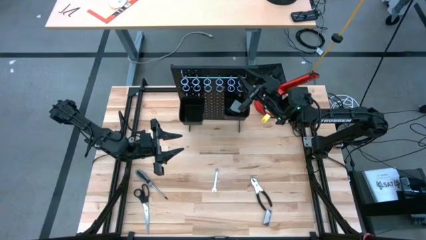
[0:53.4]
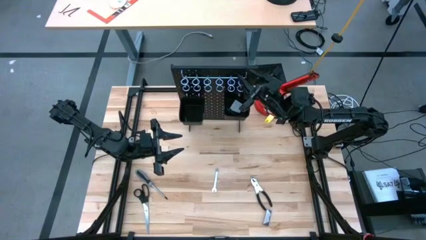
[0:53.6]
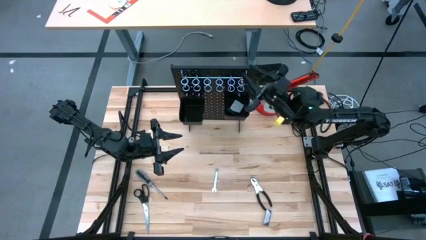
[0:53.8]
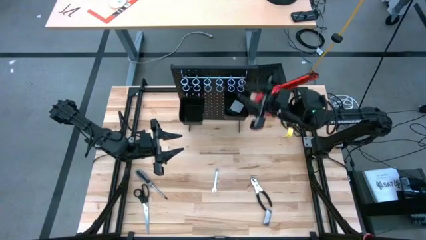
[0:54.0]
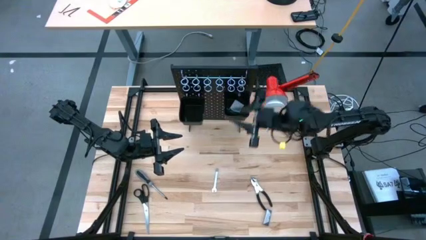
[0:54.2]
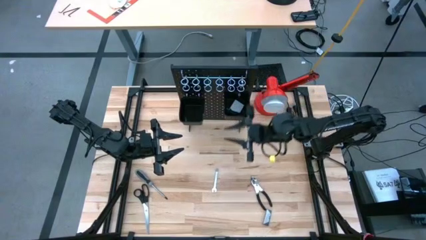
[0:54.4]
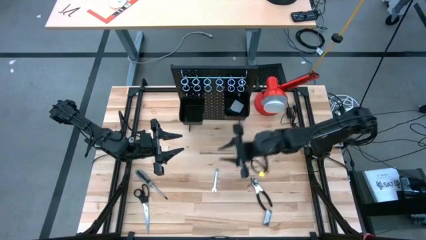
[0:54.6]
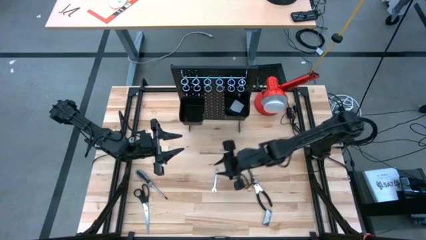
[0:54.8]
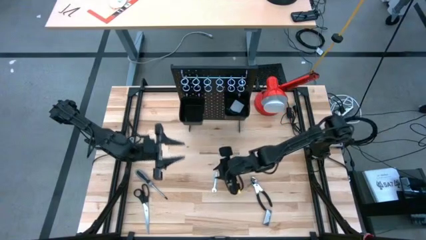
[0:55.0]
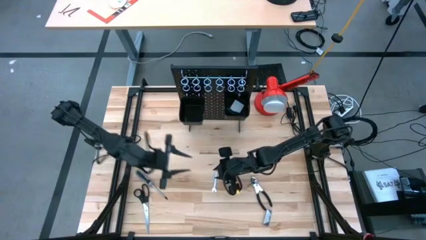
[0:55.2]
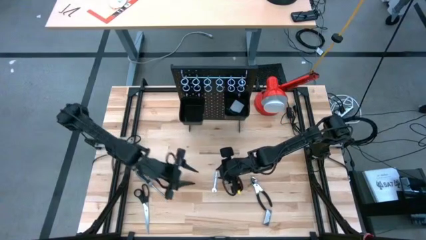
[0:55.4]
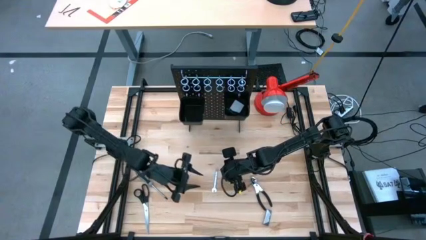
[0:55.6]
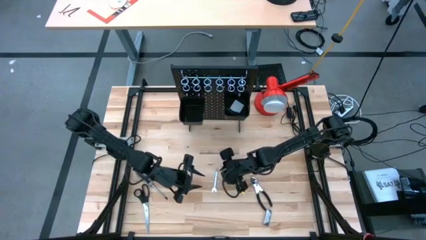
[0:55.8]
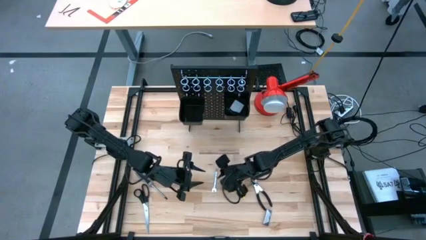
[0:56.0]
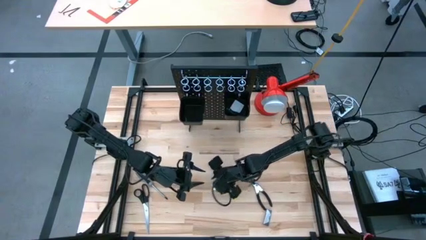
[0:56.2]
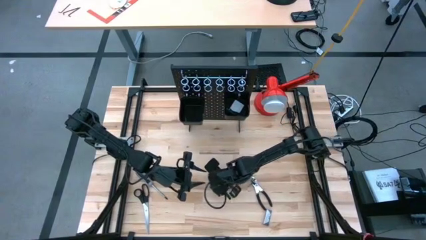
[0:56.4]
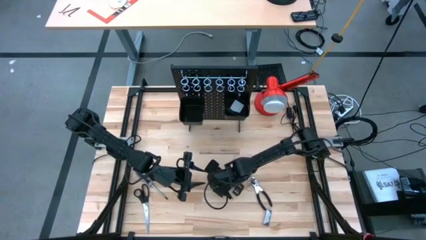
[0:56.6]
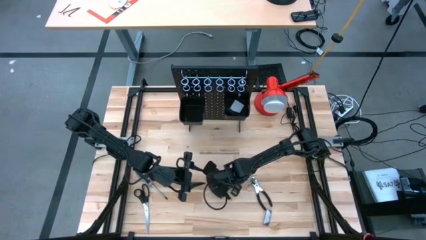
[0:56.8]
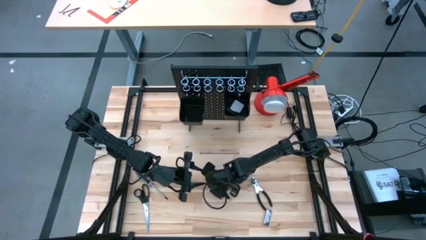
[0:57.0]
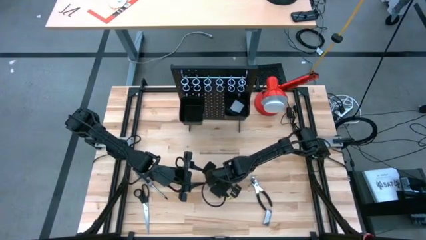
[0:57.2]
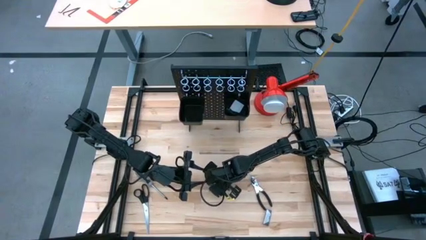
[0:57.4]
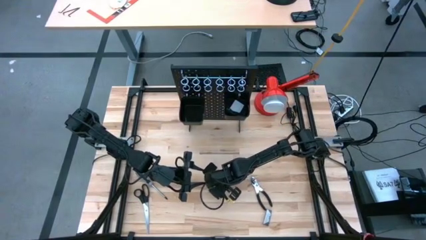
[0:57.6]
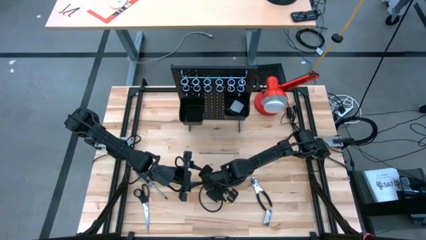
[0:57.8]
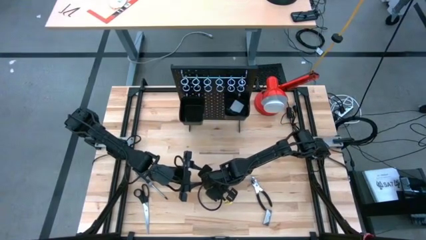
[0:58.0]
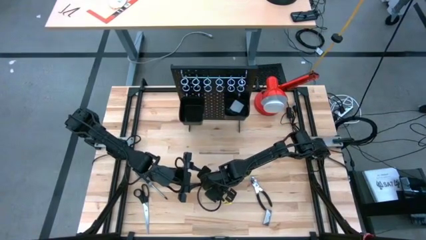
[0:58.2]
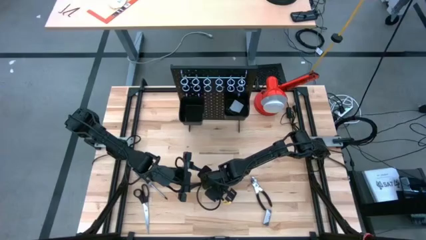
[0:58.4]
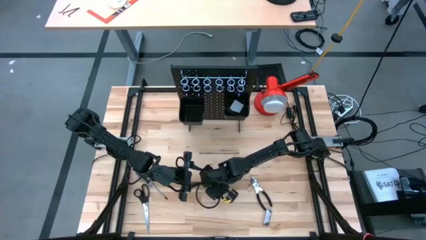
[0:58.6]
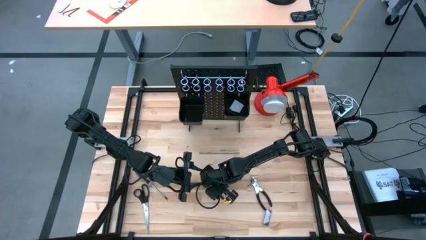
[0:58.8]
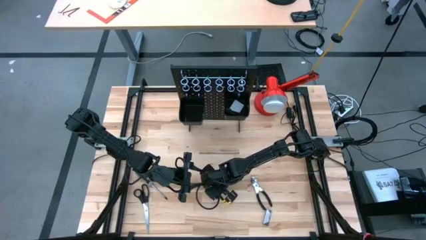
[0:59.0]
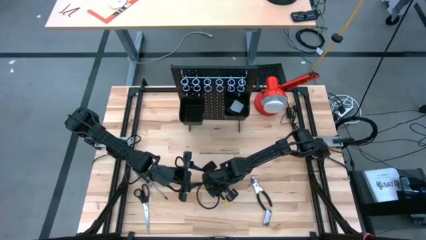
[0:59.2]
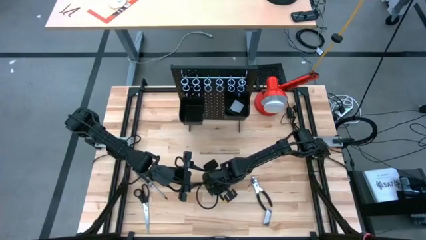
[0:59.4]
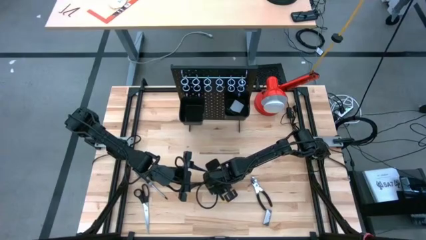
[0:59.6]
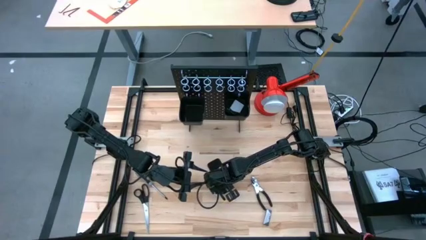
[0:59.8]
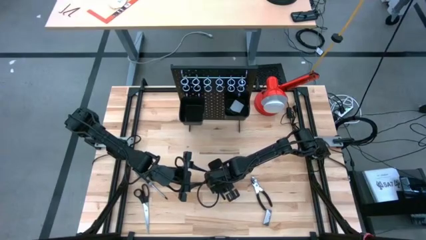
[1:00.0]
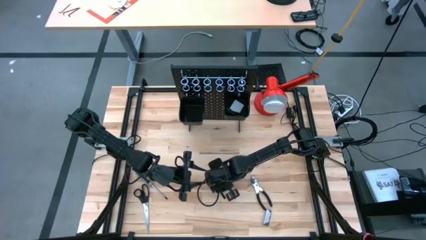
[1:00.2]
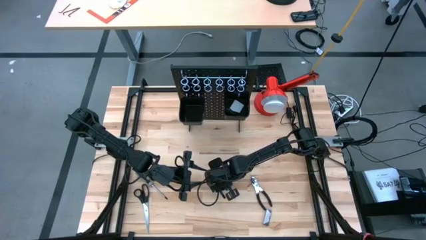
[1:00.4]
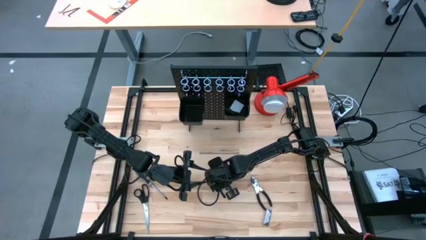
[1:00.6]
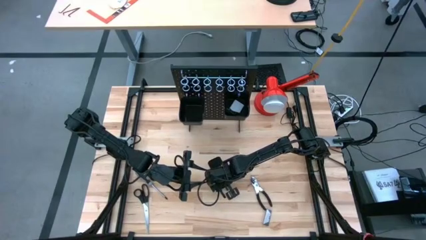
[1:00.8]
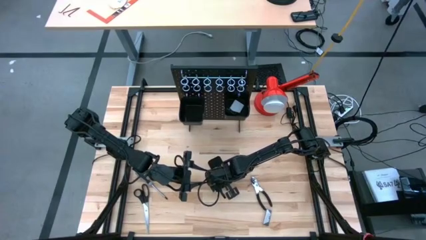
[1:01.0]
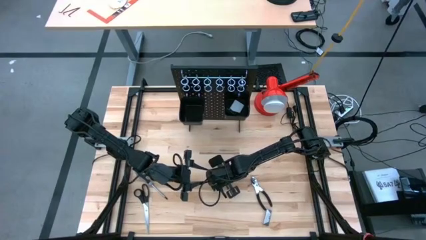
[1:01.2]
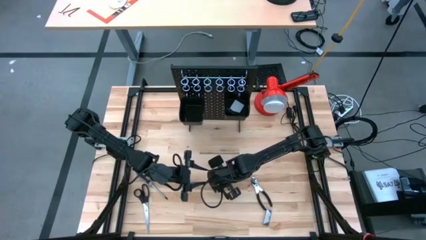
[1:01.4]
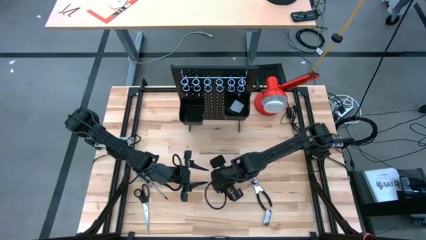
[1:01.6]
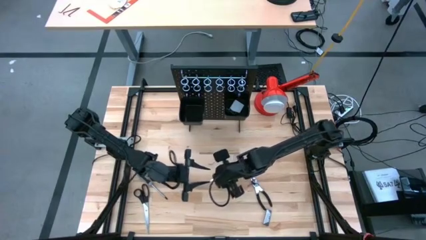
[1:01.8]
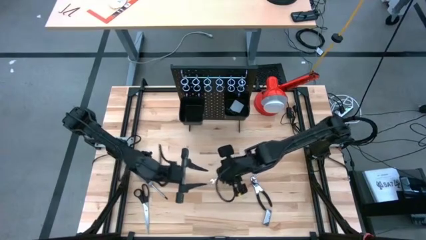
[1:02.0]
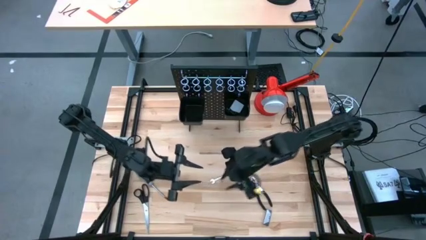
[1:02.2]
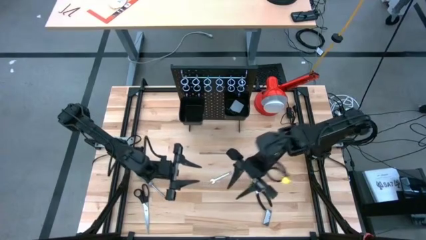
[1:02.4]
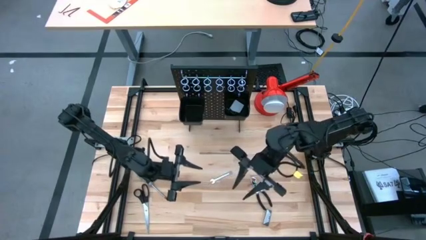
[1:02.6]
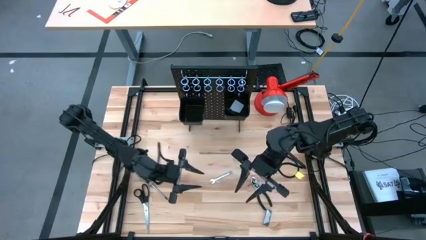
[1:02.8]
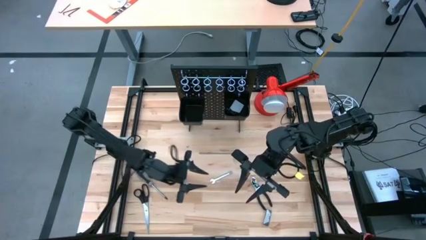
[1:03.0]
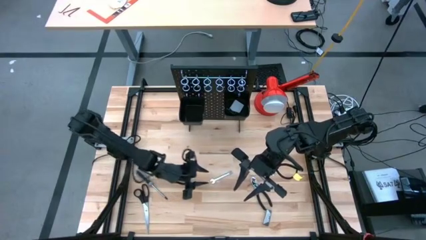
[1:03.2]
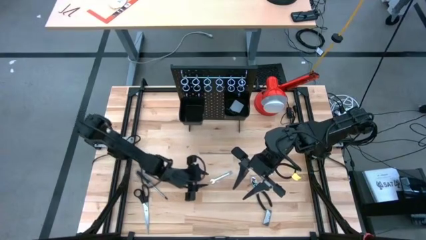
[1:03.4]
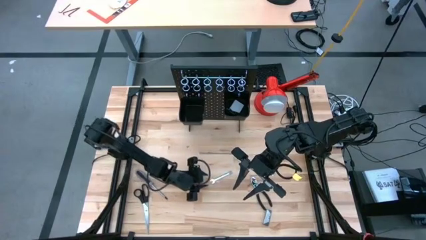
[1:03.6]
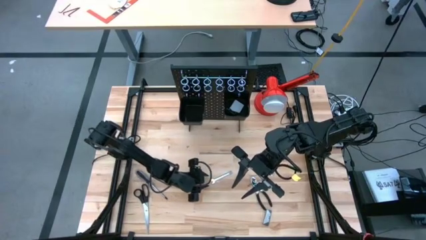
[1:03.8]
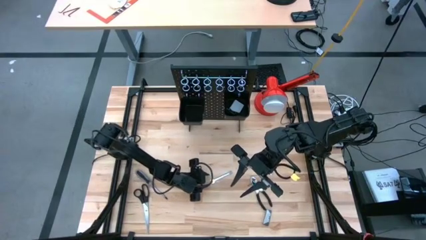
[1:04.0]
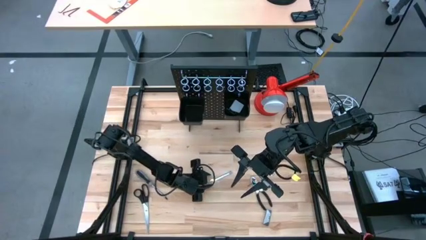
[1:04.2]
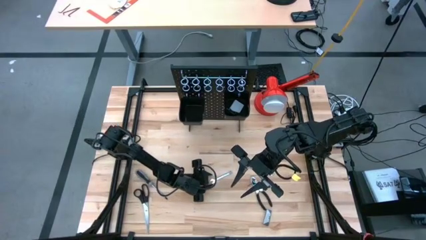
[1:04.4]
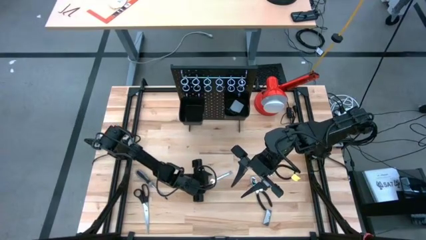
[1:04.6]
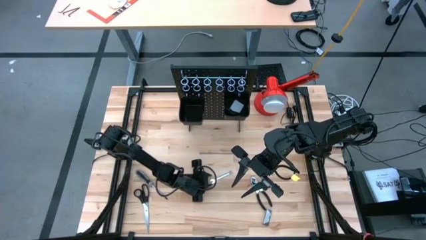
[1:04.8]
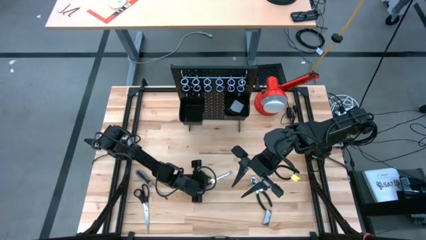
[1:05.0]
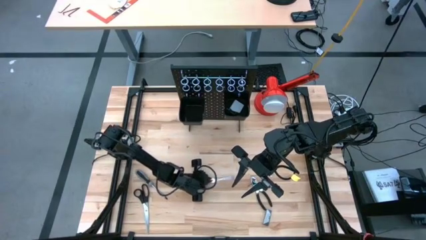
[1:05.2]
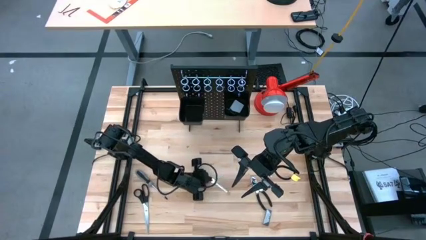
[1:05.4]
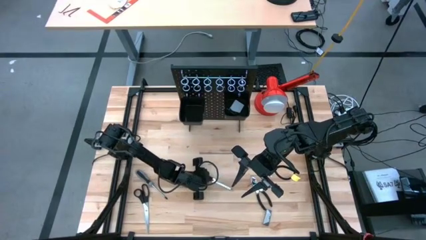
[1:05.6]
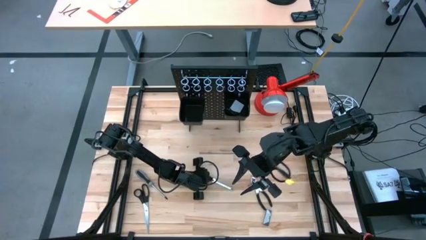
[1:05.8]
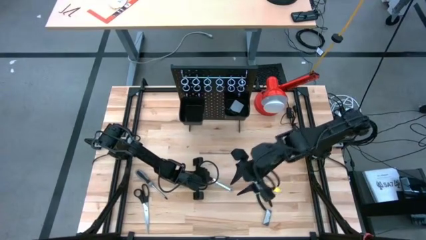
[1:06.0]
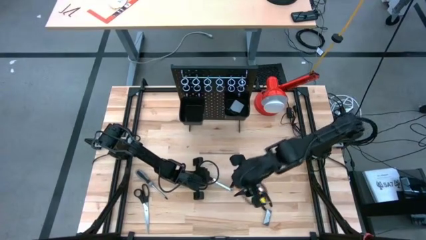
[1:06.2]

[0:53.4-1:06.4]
Task: Hang tools onto peg board
Hang the wrench on the pegboard

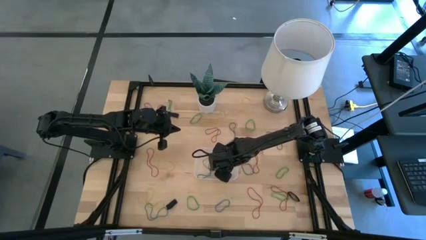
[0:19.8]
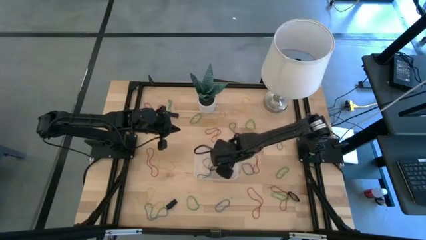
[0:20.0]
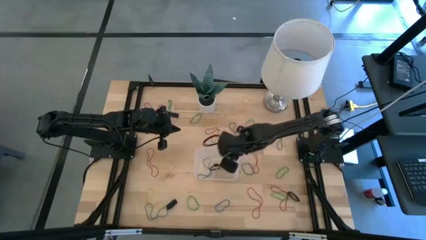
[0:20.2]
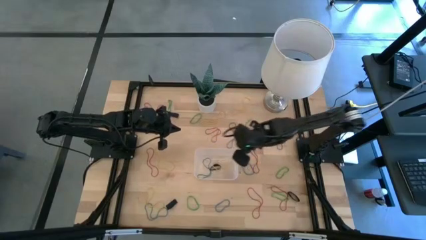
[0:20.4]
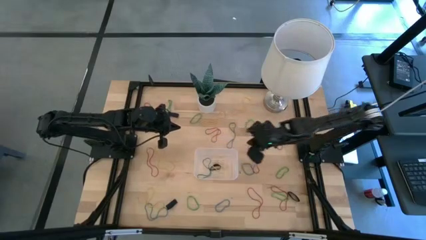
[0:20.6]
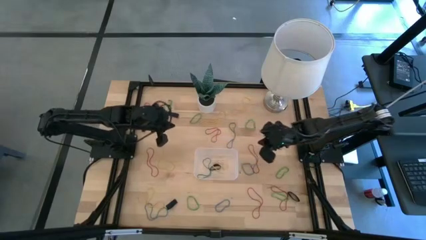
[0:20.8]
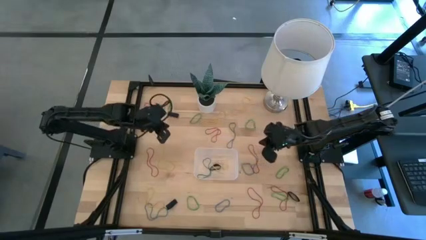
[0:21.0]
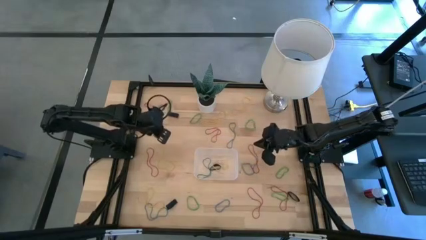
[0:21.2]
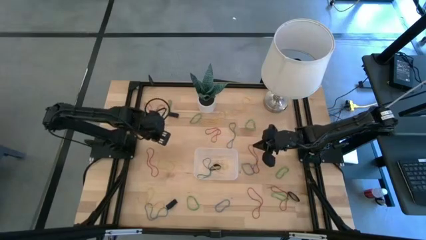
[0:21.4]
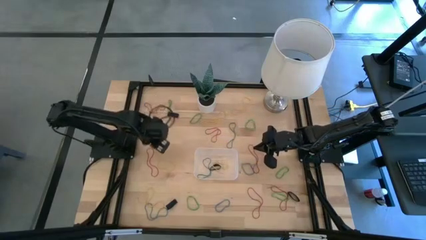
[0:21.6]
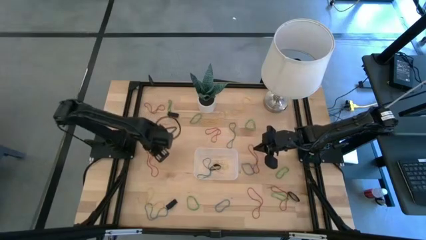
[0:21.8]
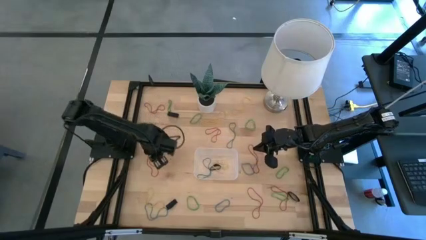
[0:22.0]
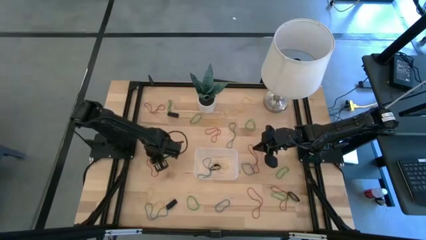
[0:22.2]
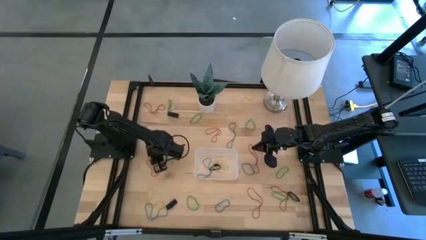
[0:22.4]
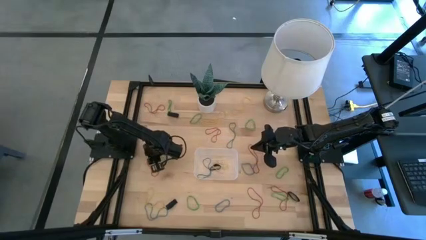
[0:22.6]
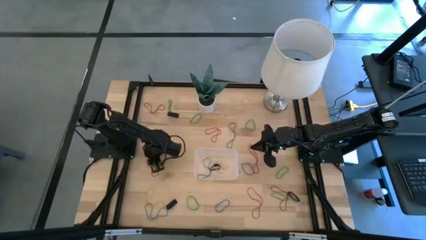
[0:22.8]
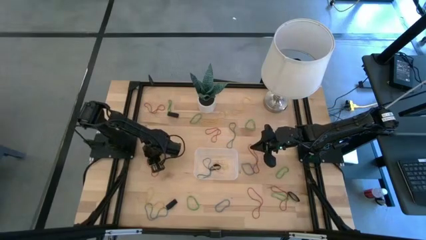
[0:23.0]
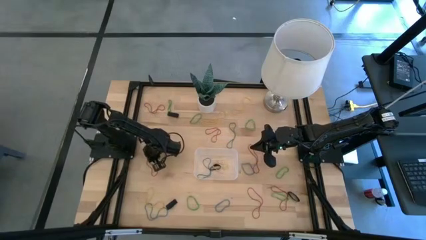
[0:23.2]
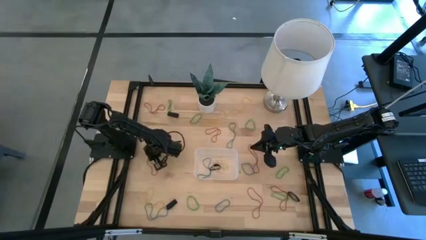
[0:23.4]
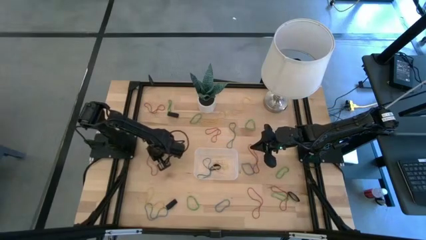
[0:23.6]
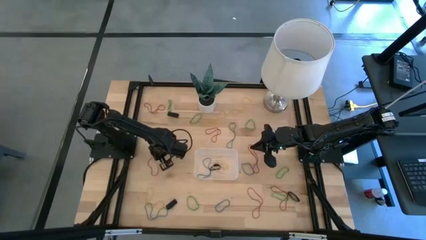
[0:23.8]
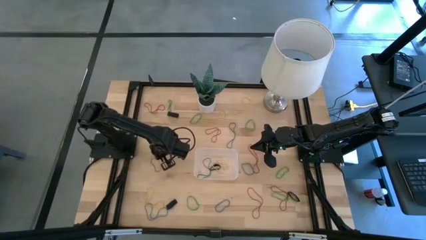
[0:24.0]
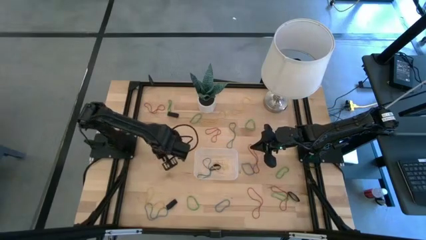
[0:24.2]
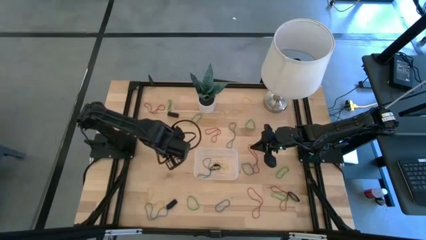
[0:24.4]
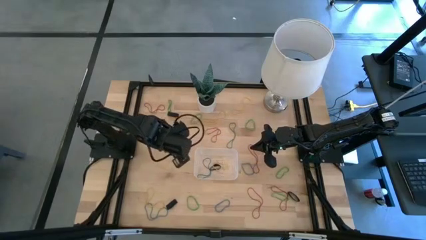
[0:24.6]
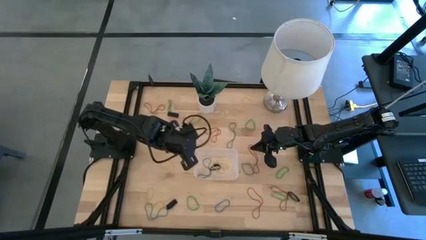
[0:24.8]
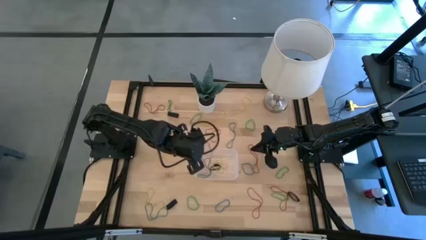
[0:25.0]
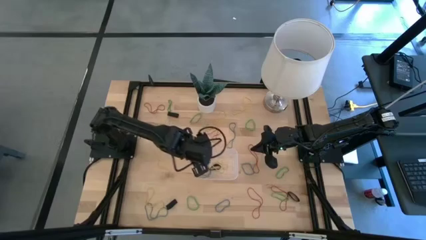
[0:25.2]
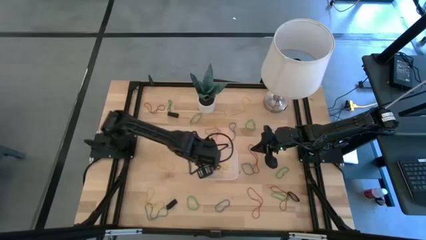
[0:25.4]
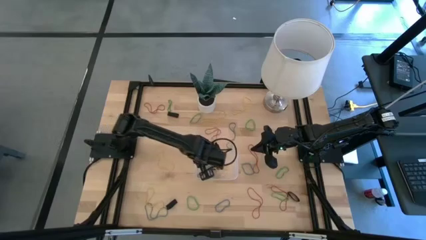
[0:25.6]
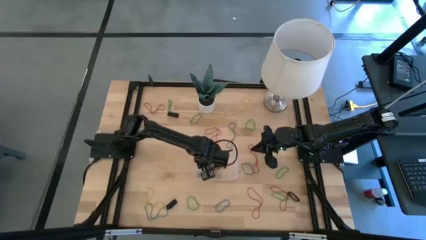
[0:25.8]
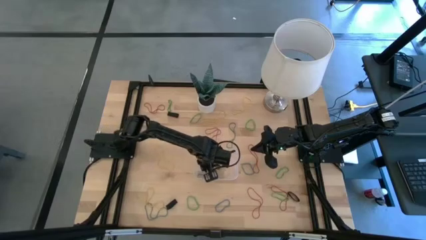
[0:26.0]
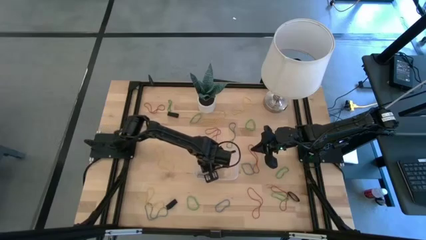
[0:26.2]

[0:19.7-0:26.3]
Task: Pick and place rubber bands into bin
Put the red rubber band into the transparent bin
